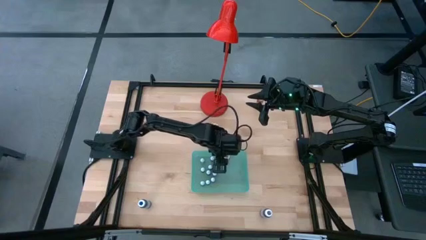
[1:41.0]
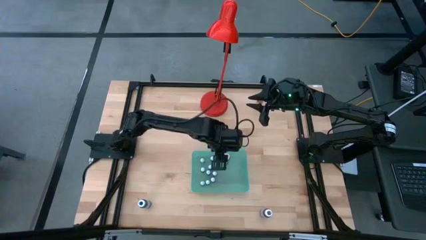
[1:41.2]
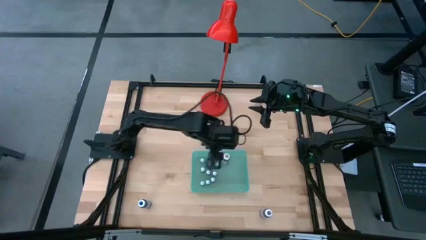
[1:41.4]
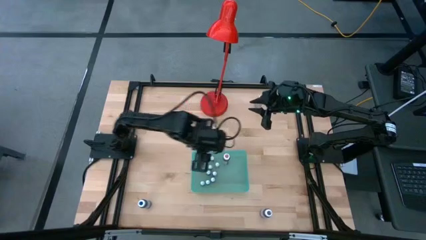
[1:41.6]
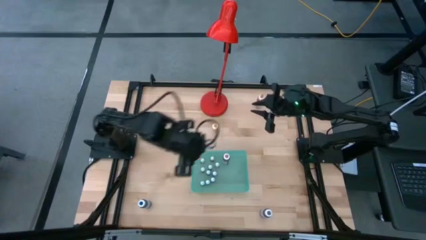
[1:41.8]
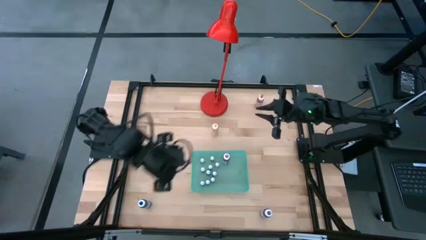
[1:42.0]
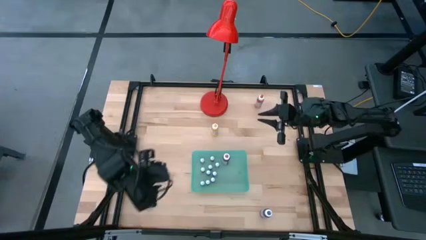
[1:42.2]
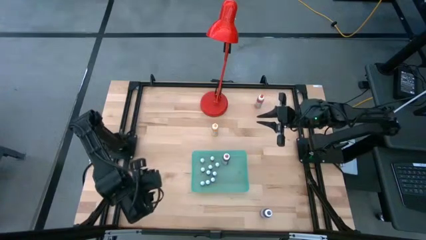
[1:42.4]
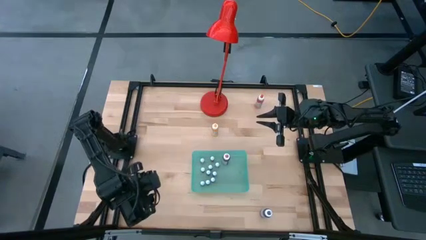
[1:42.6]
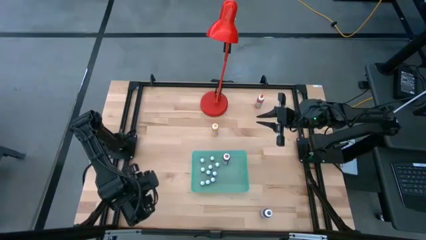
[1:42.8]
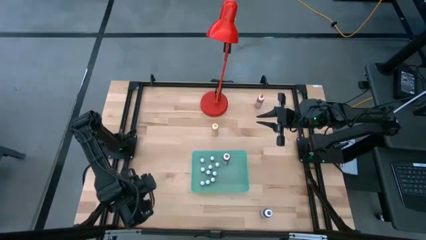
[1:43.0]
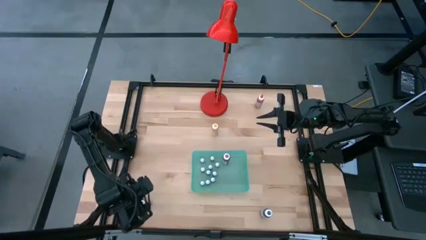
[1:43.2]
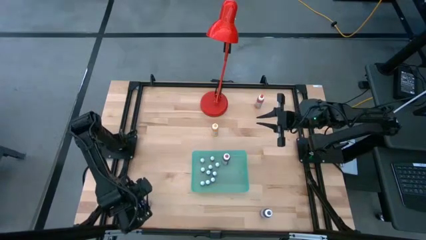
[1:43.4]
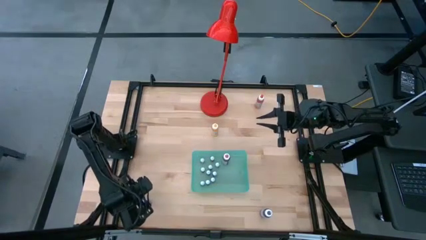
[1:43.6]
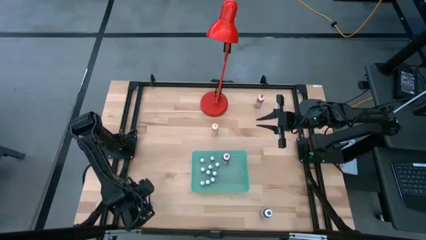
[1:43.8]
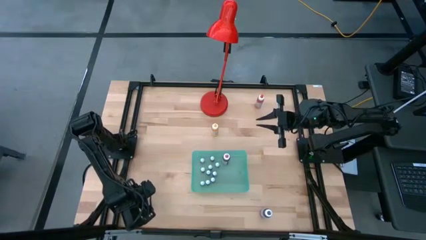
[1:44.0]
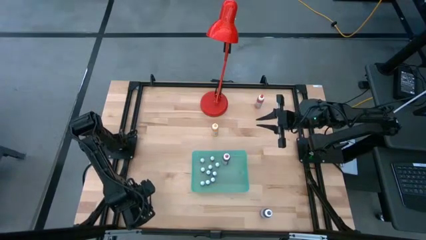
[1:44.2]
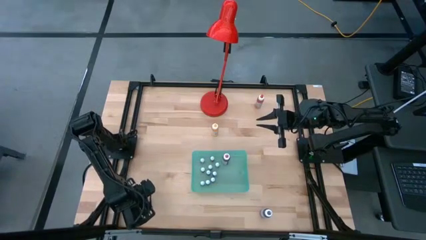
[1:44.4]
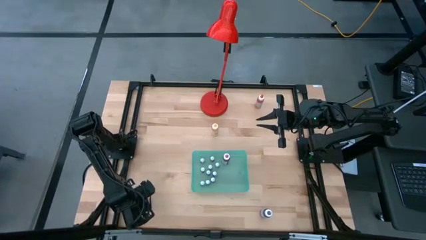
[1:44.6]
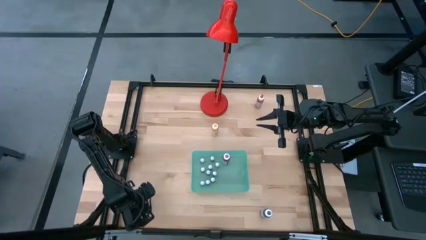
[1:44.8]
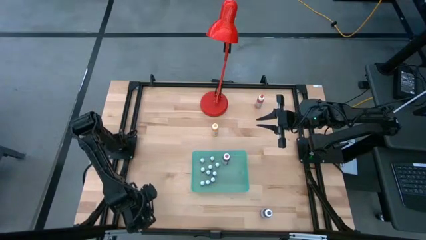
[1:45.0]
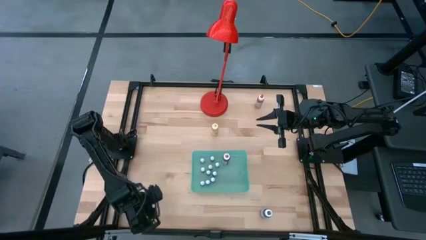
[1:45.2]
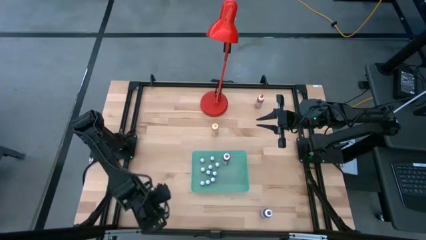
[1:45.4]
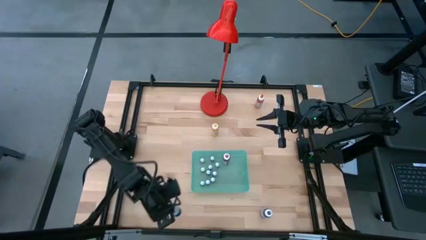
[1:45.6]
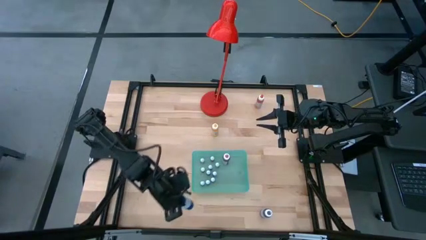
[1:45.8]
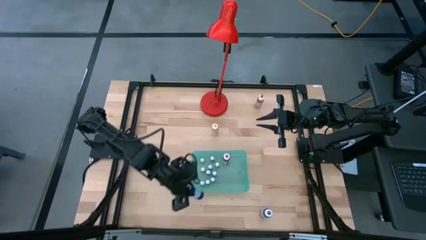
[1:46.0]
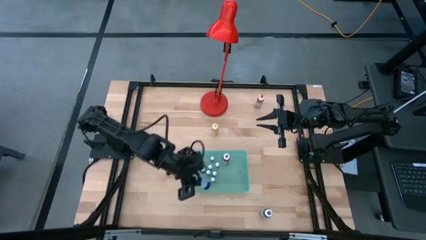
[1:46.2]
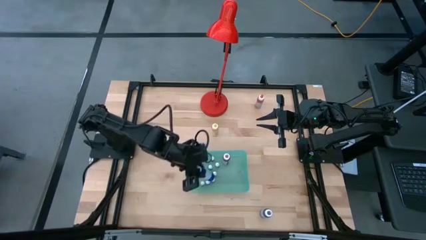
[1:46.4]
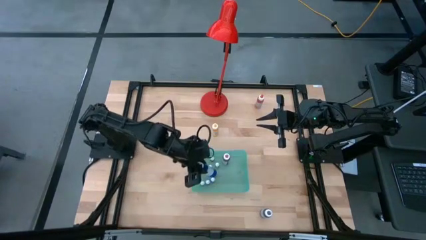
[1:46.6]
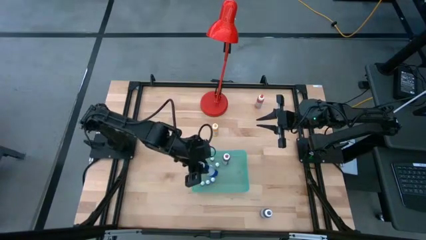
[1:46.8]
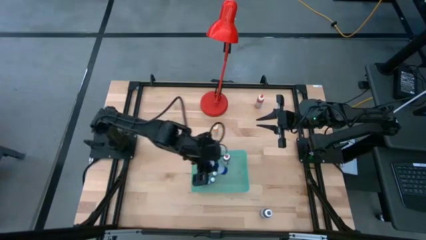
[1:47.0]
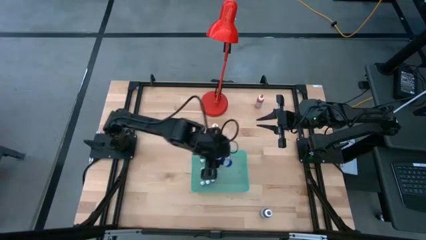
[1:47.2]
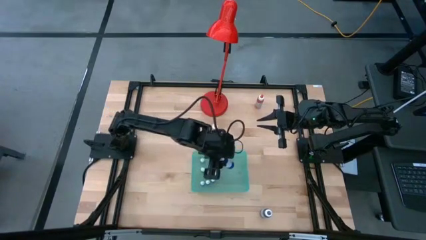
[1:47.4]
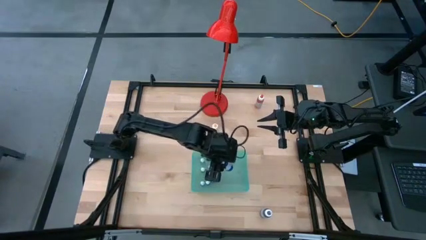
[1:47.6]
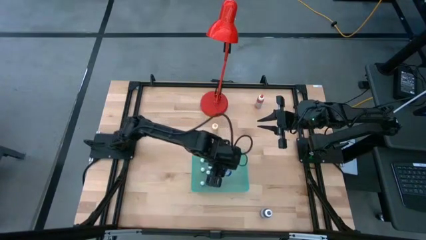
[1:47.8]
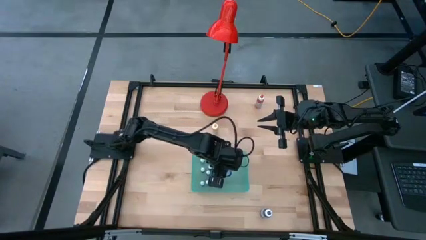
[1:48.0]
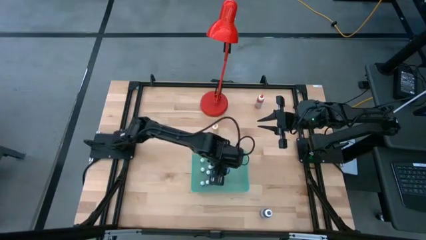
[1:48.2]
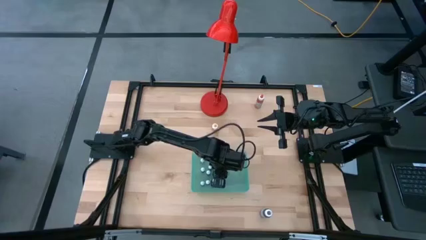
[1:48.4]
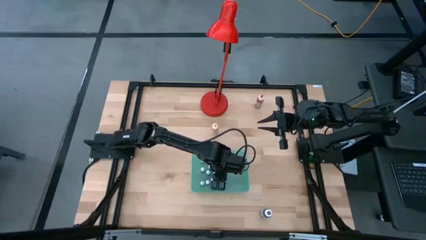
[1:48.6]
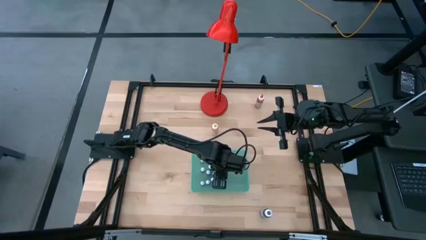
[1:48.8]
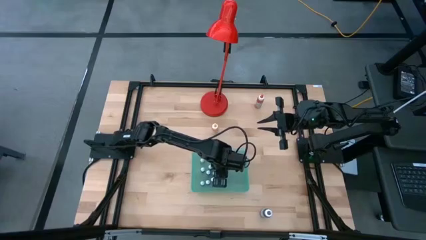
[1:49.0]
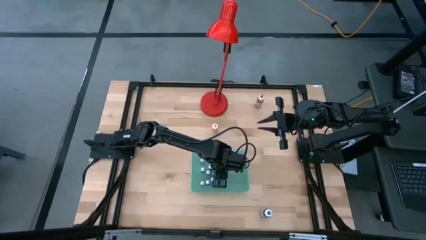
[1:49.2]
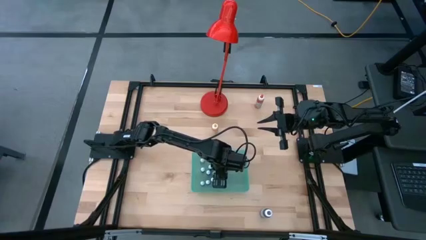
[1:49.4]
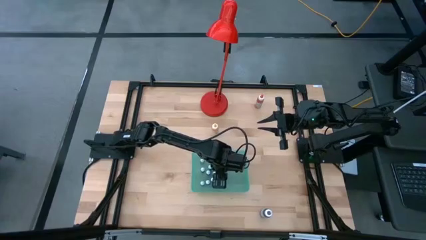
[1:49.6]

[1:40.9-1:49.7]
Task: Pick & Place food coloring
Put the big blue food coloring bottle into the blue bin

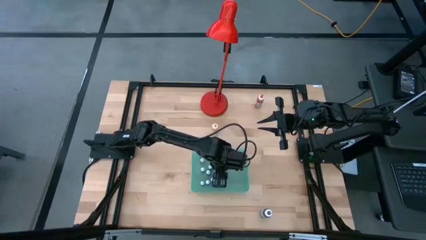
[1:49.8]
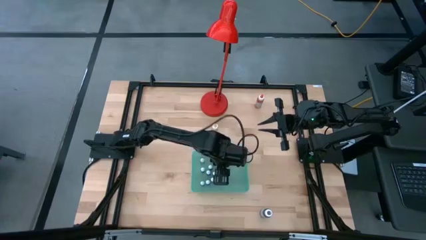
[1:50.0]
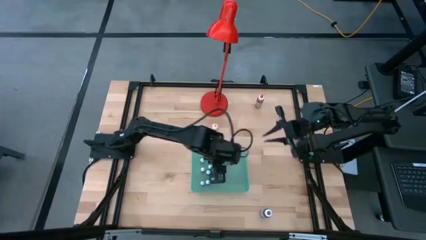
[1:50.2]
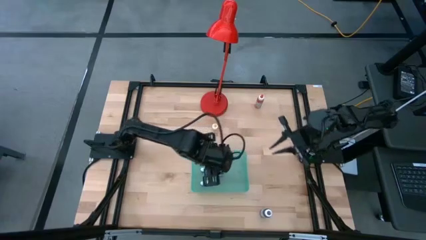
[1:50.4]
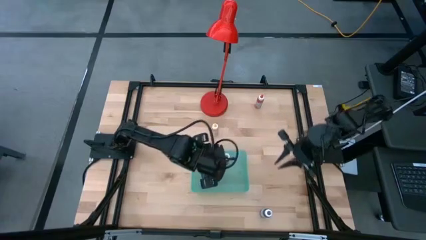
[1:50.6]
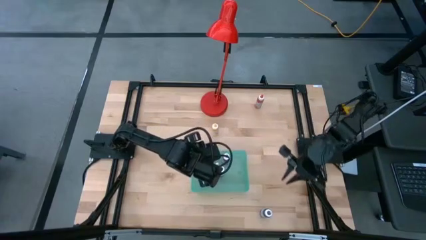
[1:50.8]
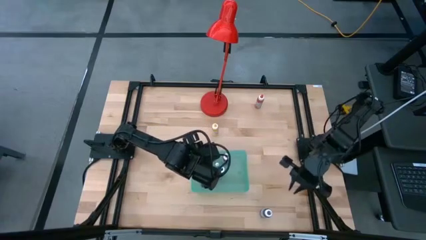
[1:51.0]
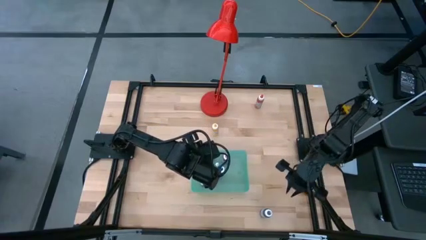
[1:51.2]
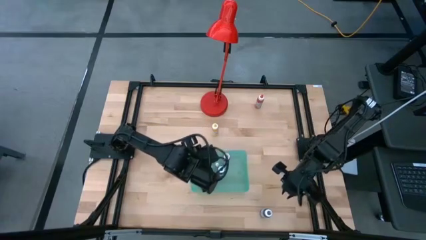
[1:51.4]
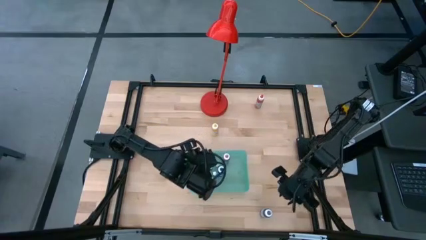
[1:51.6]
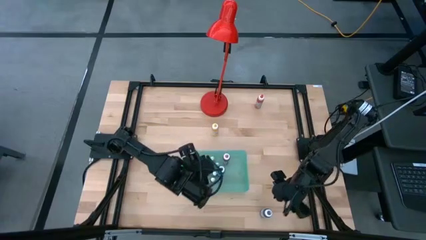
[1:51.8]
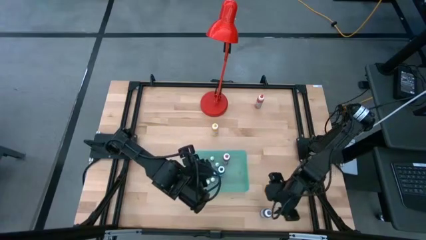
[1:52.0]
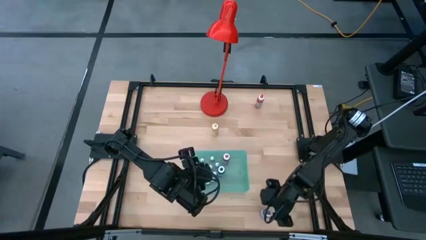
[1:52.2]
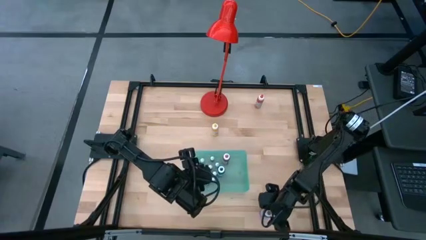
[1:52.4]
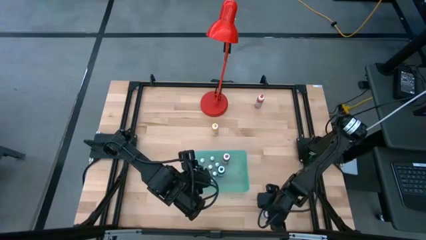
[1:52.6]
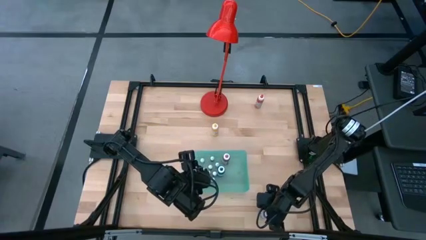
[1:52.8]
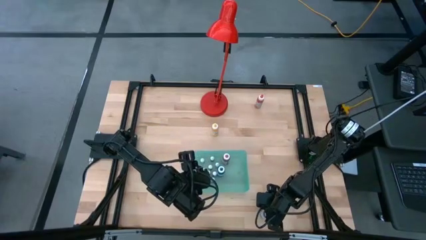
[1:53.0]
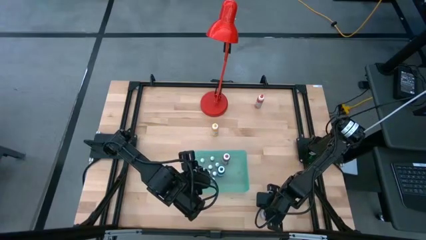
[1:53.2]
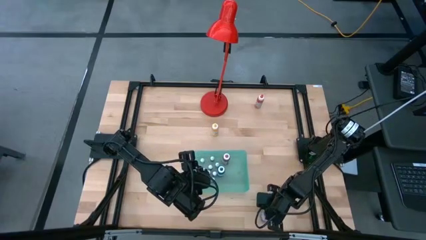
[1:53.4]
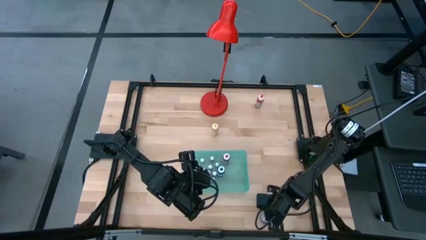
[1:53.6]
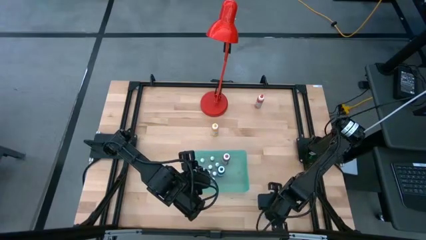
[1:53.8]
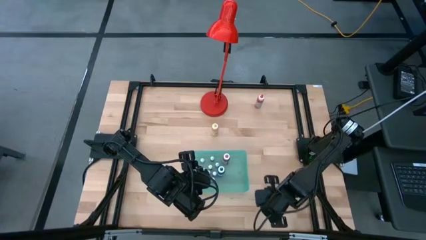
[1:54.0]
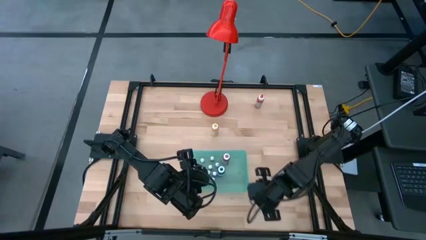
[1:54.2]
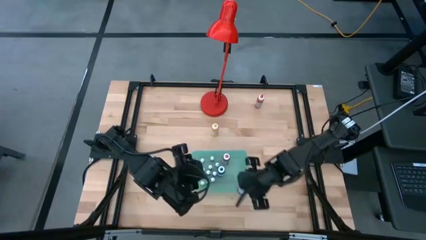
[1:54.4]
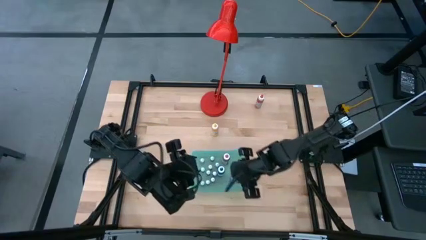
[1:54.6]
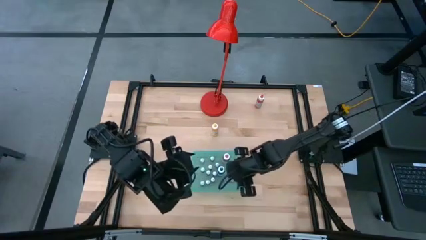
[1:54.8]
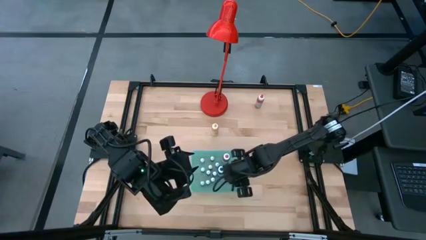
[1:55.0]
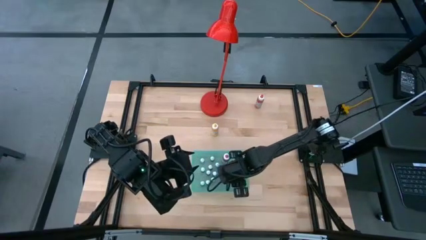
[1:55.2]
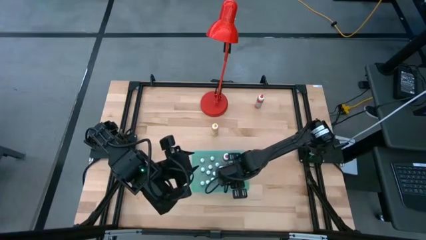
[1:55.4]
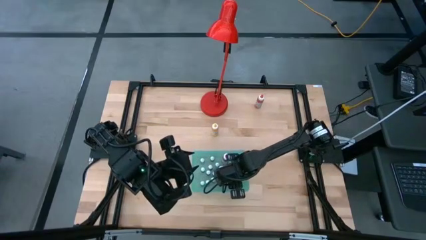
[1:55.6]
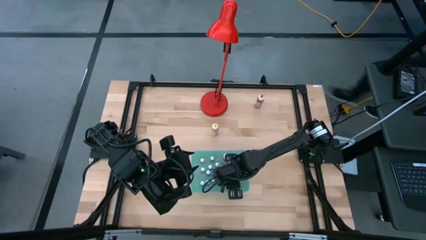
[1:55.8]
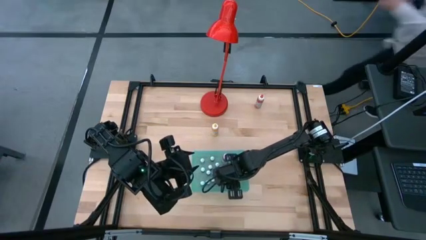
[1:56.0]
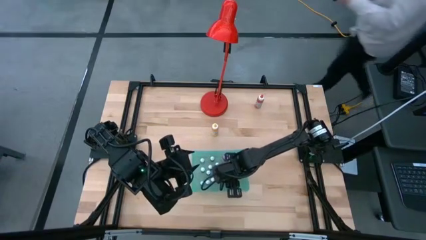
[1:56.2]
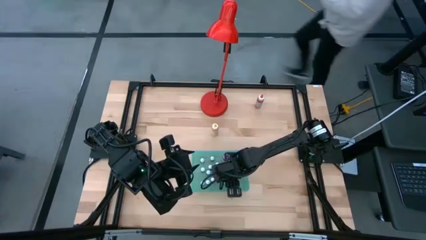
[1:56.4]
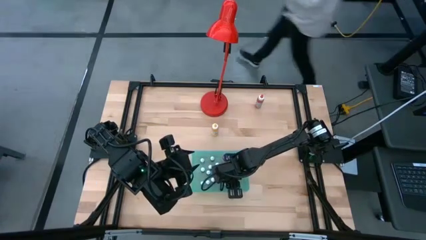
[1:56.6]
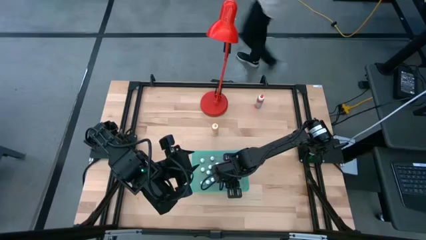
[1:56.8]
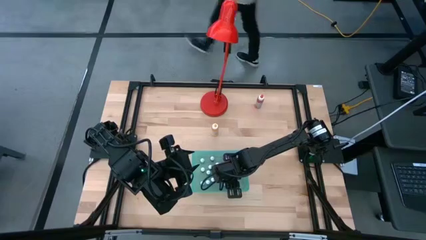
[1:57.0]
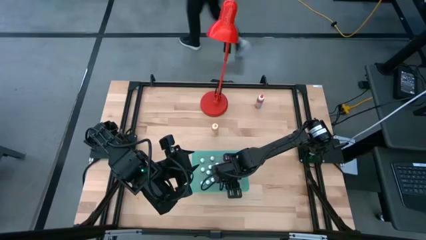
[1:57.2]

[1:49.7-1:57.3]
Put the big purple food coloring bottle into the blue bin
